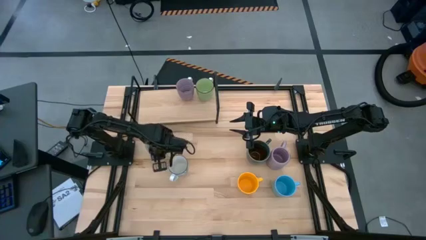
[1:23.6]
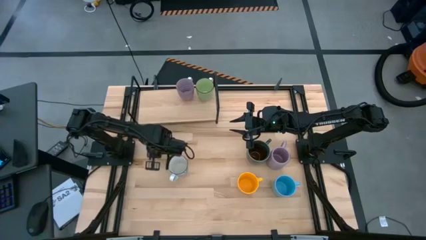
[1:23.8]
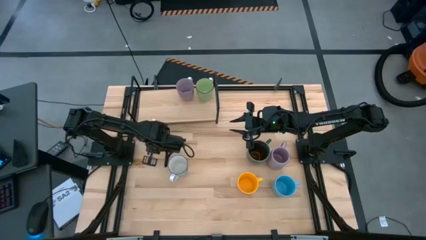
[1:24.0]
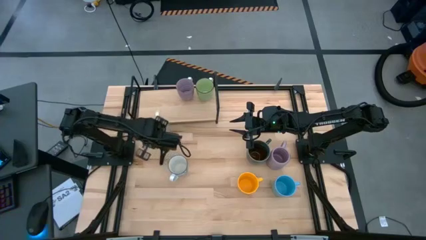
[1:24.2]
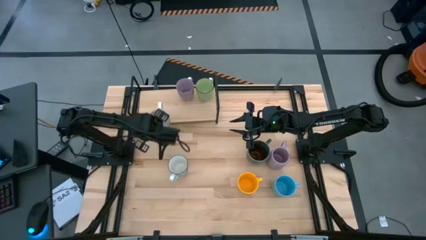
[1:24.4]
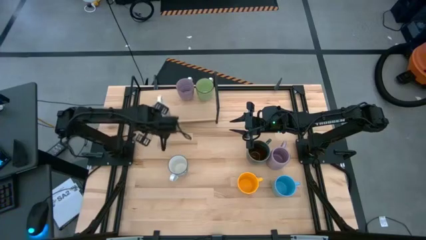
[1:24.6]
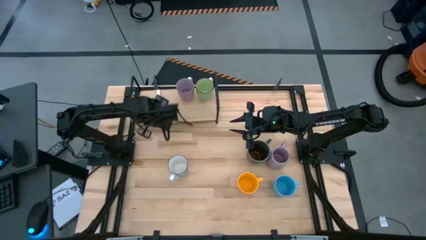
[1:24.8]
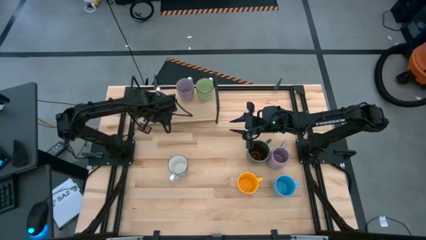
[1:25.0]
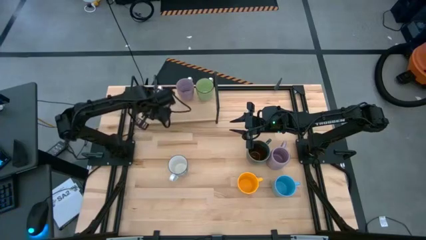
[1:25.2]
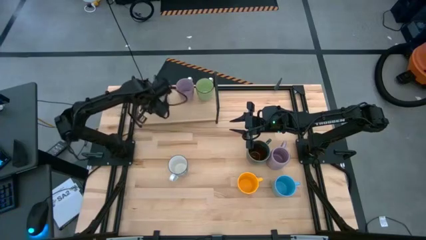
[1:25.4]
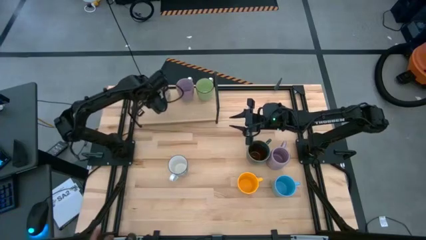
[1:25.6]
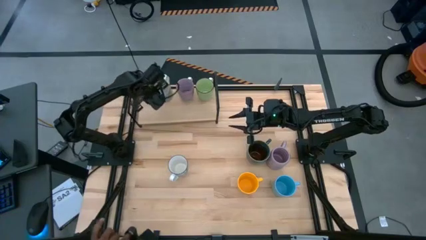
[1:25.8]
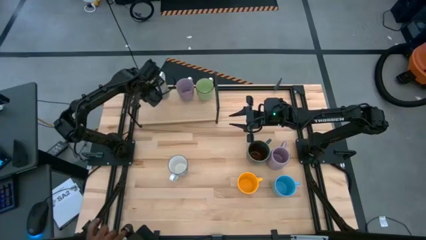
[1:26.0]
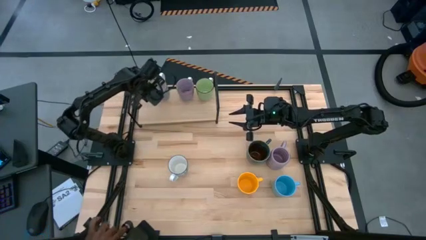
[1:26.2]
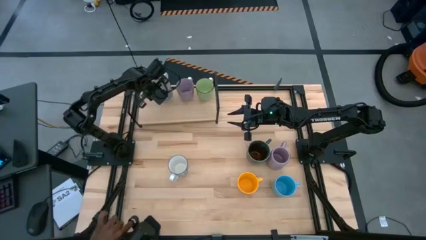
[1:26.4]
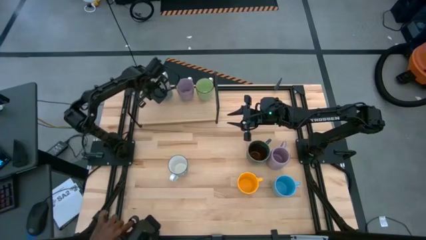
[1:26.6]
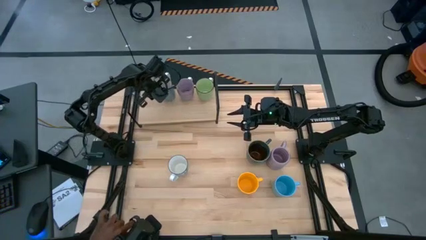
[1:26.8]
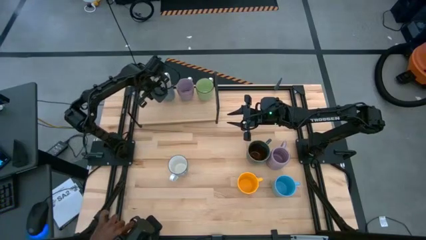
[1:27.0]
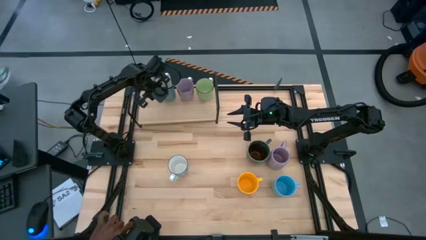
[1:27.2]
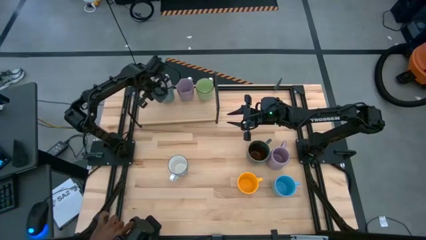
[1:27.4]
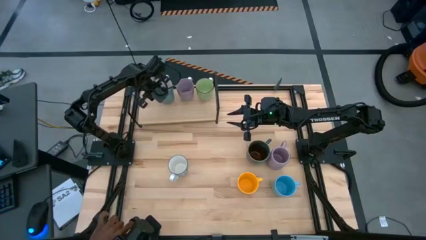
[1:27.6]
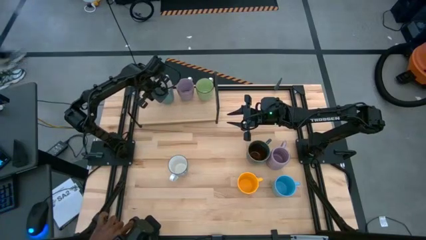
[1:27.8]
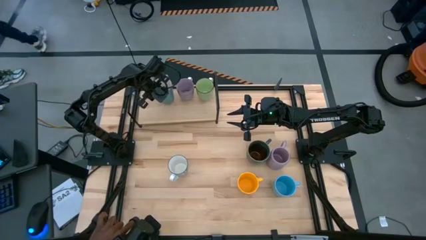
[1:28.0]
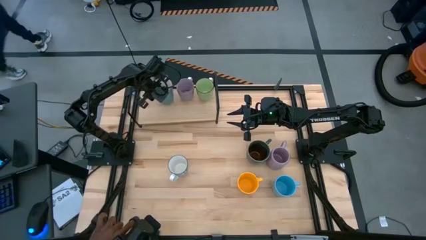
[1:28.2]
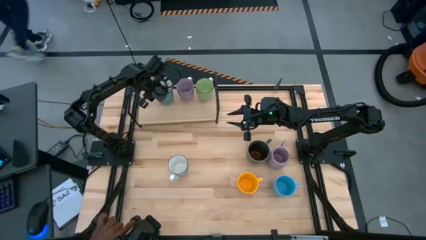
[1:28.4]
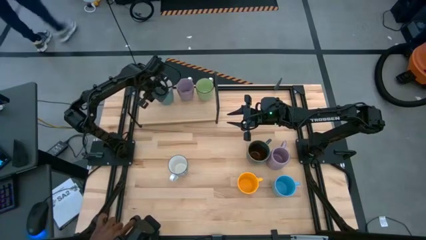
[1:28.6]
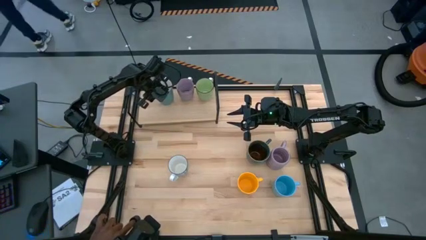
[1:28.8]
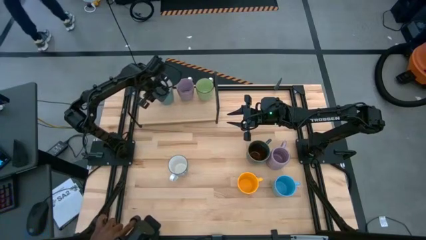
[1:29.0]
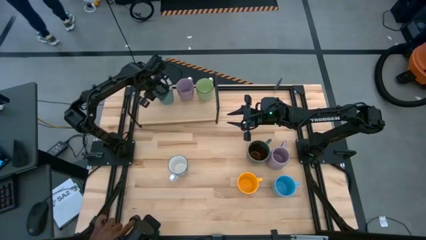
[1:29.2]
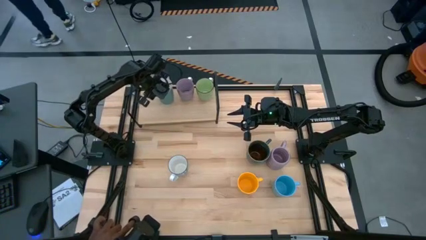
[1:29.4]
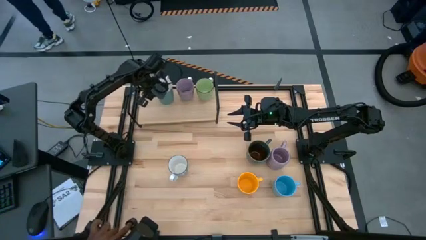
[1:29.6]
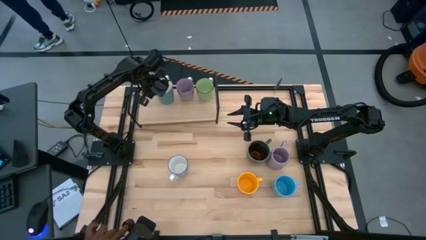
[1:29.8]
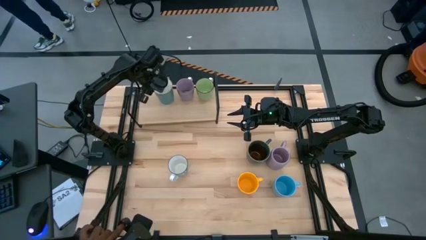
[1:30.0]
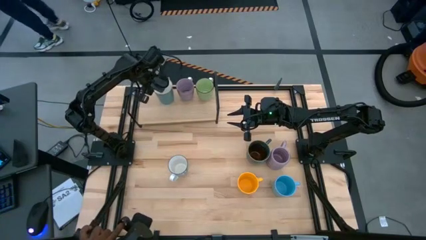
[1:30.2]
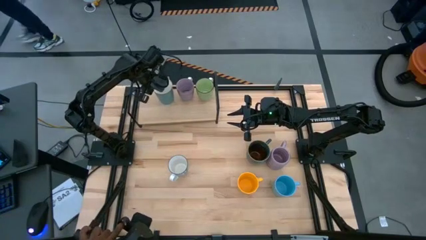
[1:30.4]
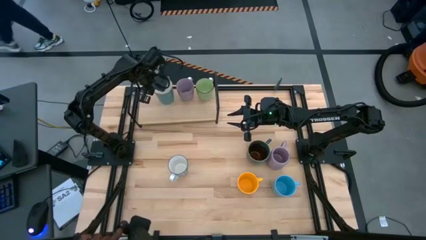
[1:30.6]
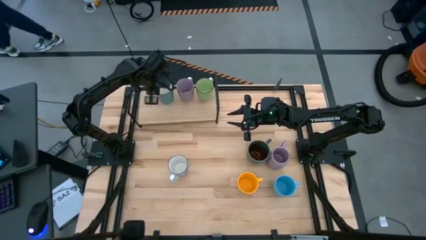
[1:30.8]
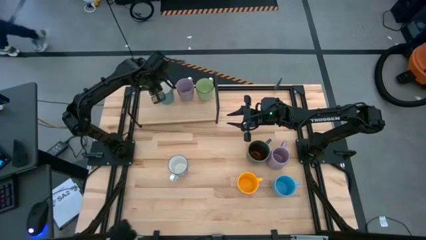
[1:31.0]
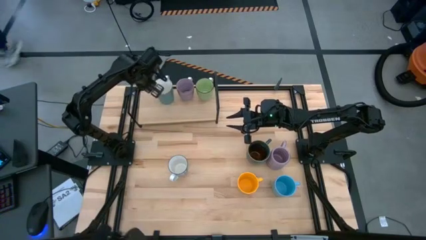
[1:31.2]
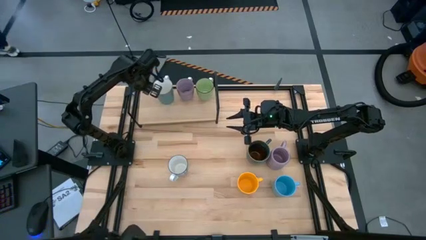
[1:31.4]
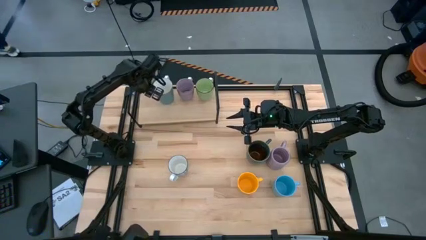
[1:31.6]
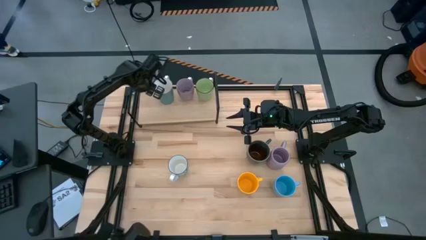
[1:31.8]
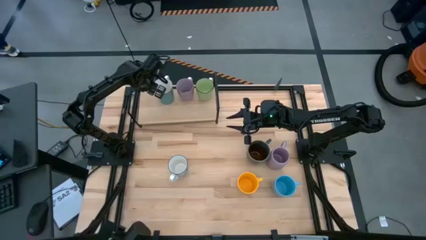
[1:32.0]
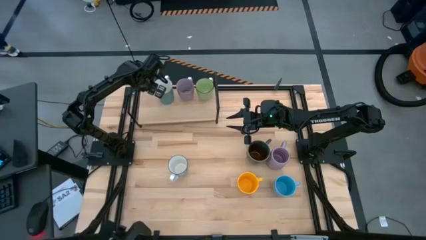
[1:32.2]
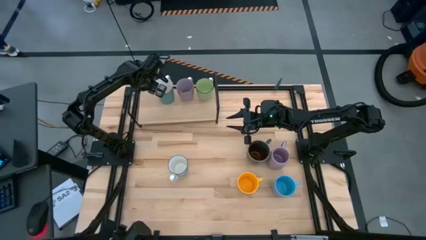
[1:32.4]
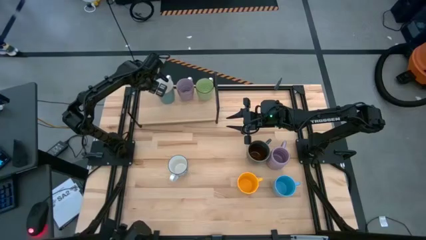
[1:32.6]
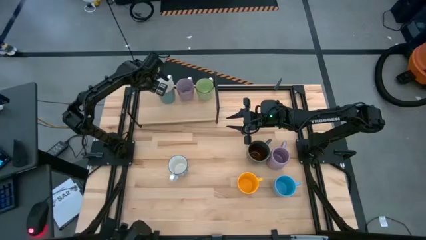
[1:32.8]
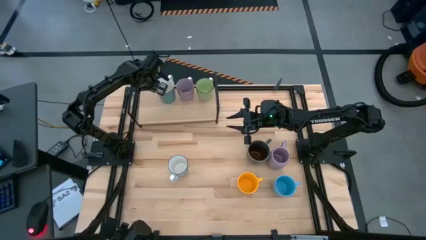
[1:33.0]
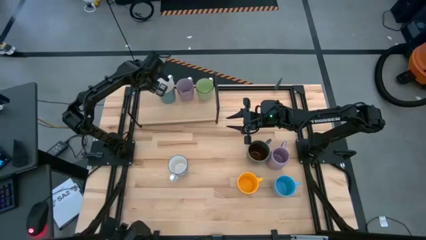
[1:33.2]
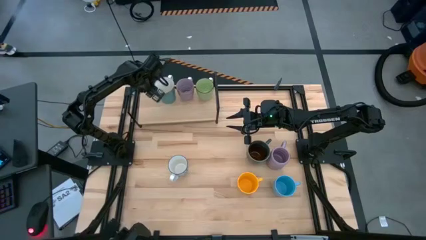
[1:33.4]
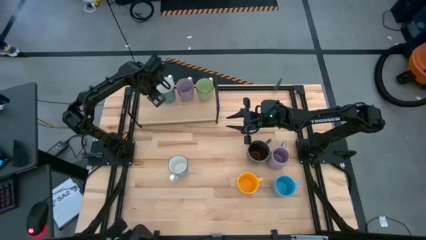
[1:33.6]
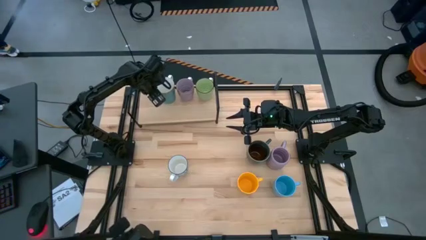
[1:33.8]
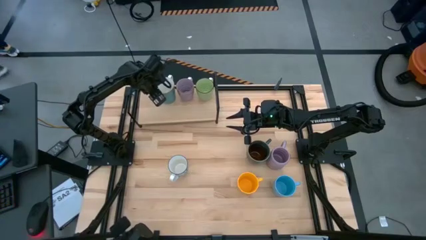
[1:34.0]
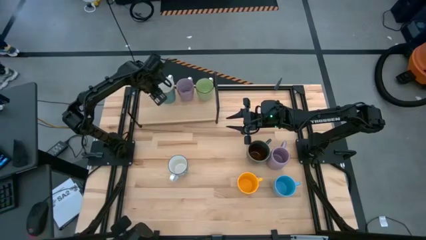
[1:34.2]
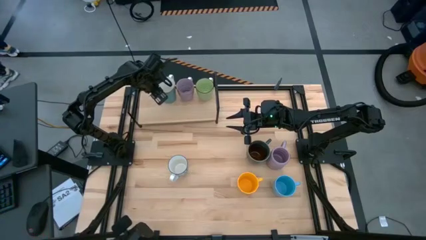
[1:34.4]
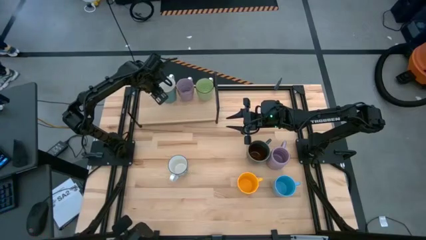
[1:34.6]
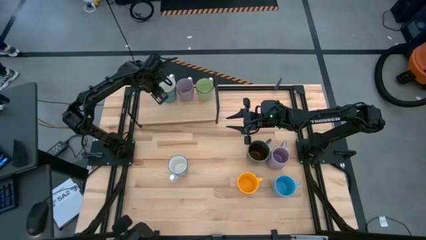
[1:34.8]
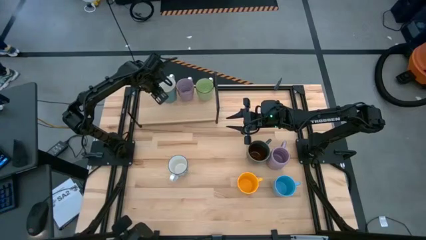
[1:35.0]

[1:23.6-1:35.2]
Task: Place coffee mugs
Put the light blue mug on the shelf

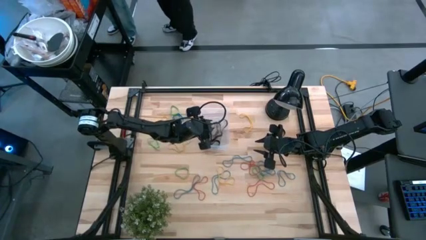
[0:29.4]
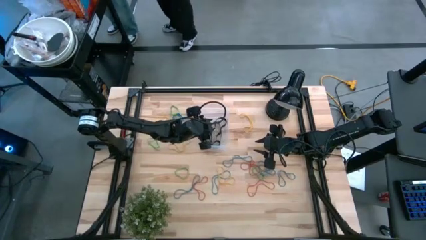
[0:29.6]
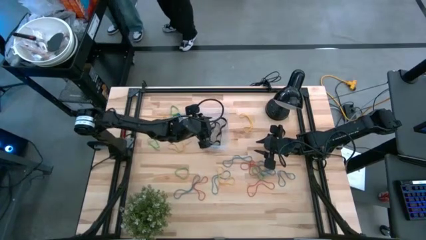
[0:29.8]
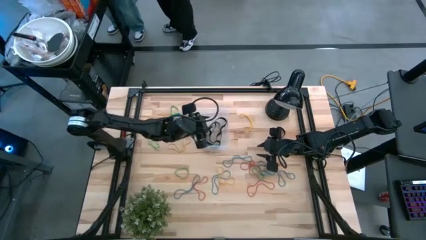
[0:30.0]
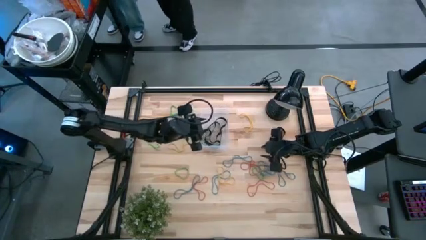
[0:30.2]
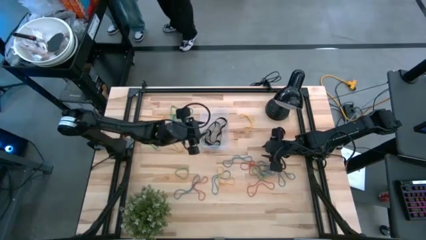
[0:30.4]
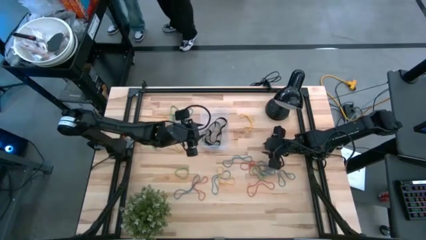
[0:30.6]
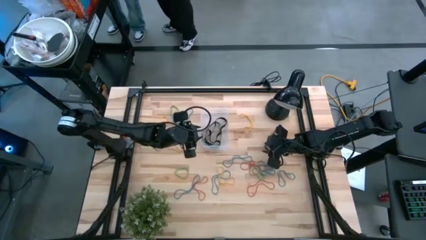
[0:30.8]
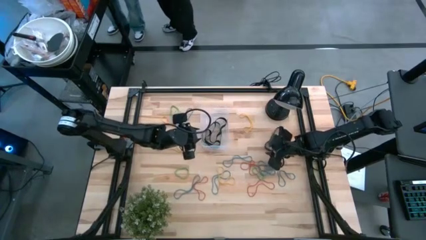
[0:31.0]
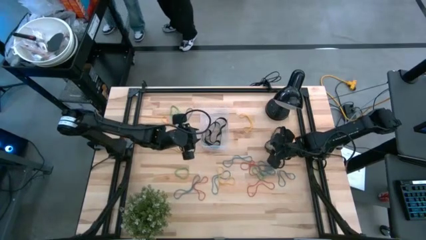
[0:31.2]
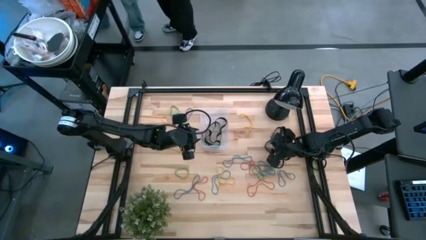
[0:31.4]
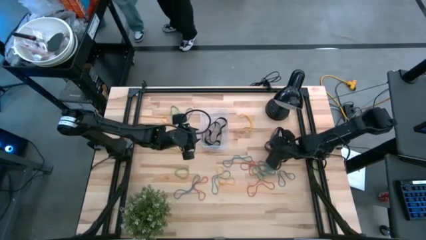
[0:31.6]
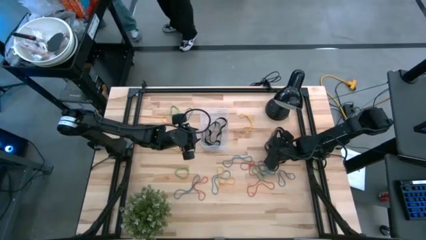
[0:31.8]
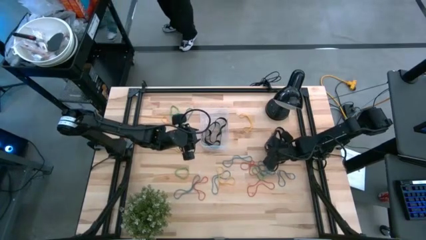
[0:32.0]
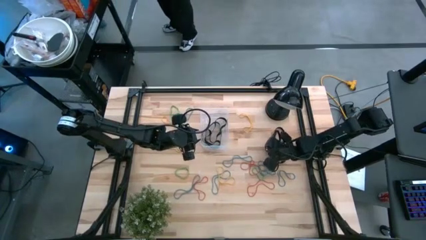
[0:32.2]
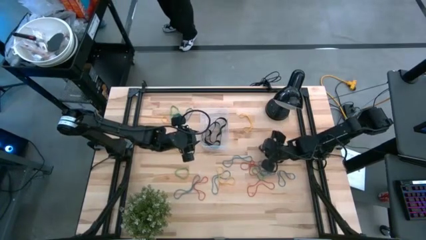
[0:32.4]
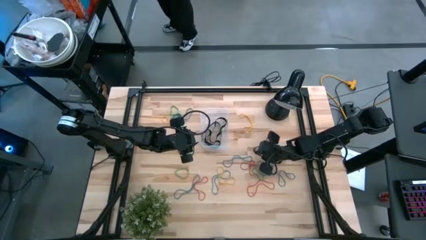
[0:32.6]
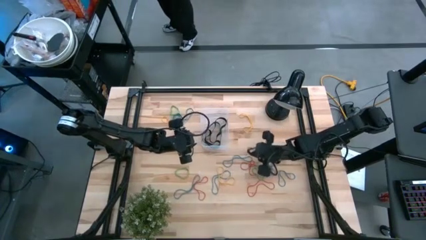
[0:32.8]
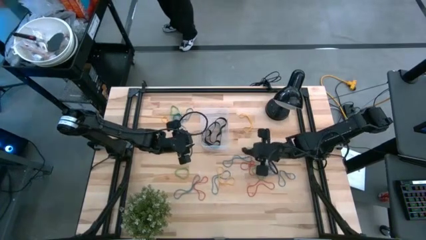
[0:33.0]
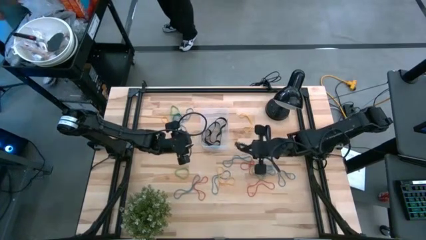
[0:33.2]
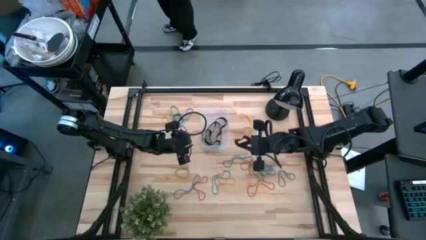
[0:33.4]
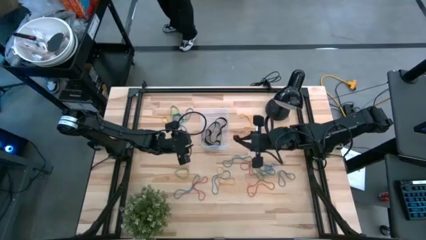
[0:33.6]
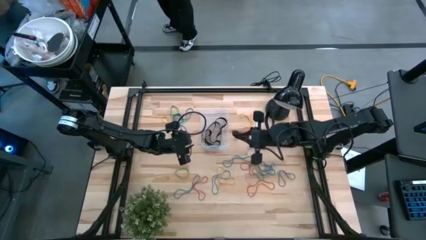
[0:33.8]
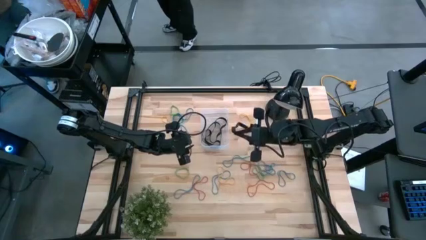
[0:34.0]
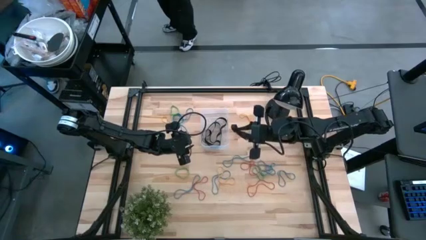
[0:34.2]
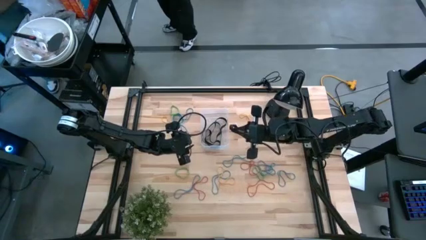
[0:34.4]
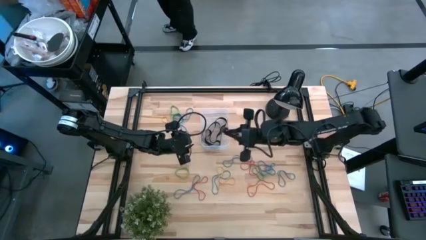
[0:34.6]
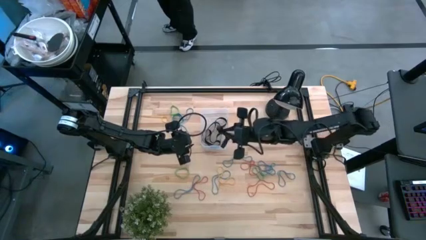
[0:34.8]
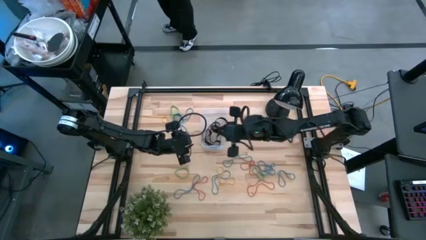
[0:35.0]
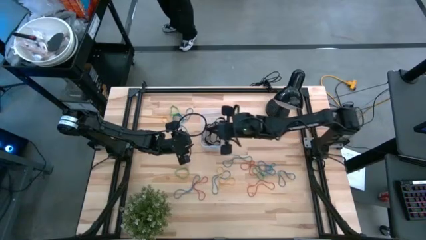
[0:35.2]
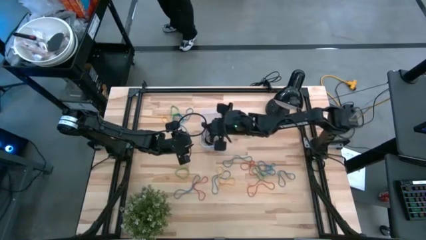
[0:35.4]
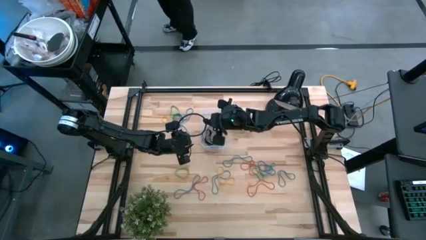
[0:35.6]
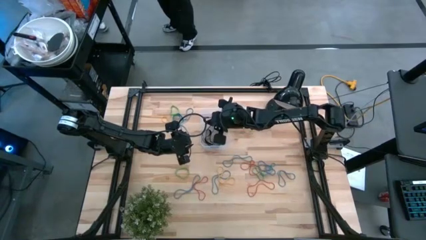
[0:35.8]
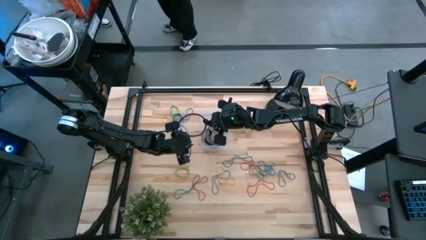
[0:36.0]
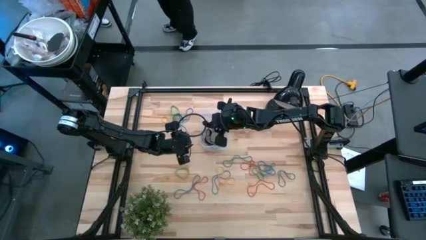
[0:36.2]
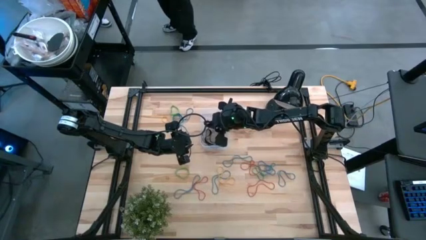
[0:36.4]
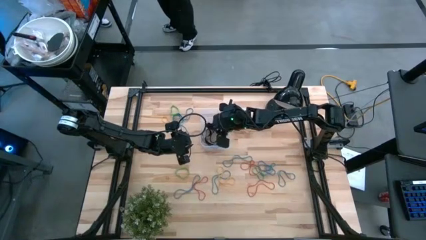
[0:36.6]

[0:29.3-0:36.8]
Task: Pick and place rubber bands into bin
Put the black rubber band into the transparent bin
